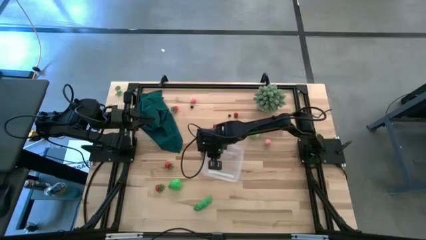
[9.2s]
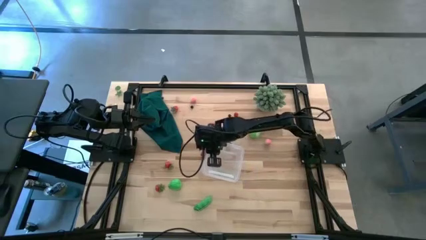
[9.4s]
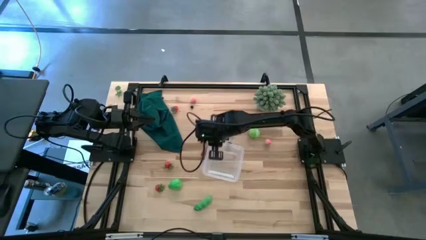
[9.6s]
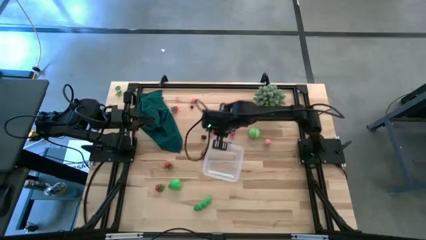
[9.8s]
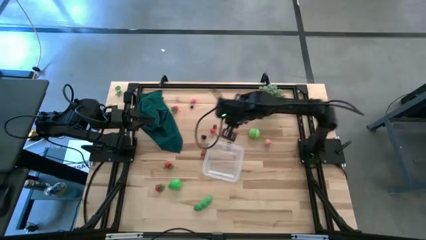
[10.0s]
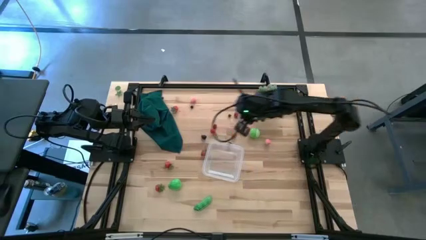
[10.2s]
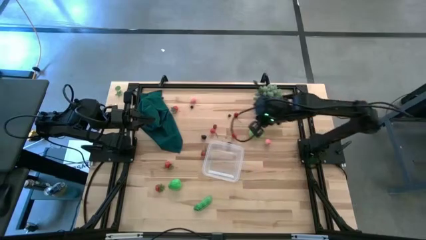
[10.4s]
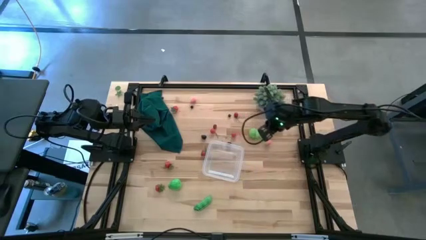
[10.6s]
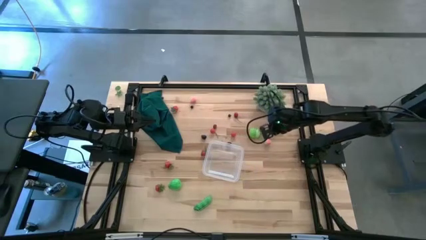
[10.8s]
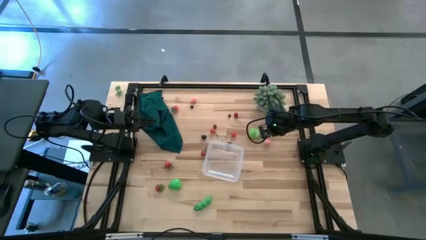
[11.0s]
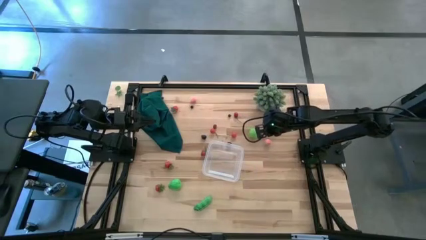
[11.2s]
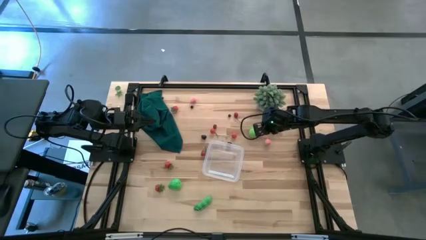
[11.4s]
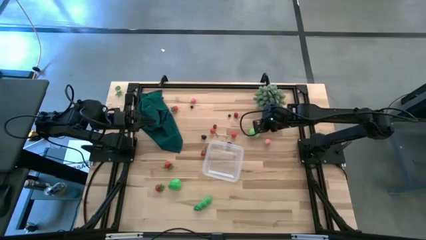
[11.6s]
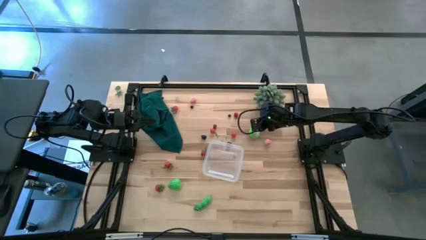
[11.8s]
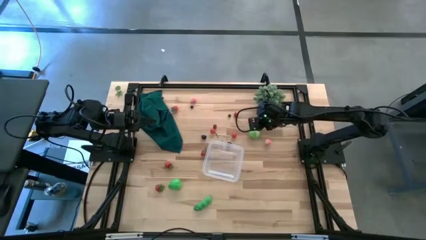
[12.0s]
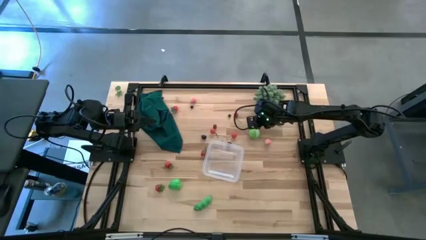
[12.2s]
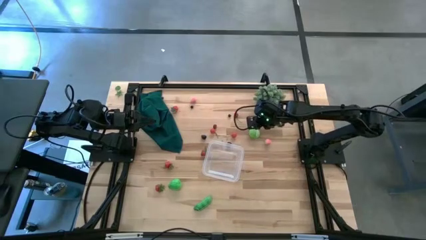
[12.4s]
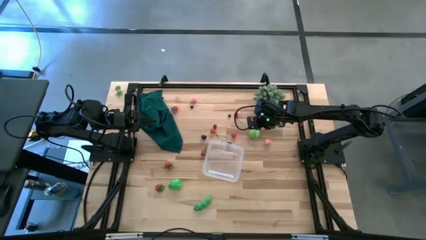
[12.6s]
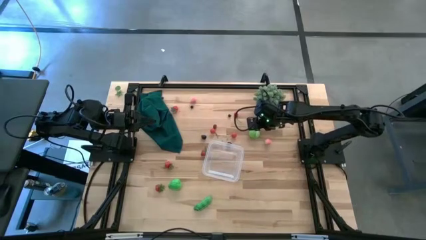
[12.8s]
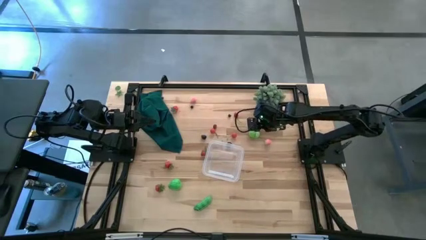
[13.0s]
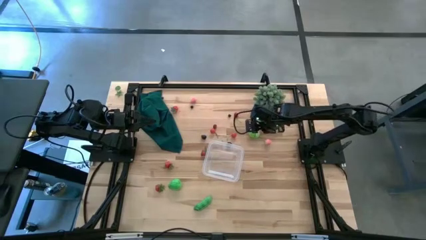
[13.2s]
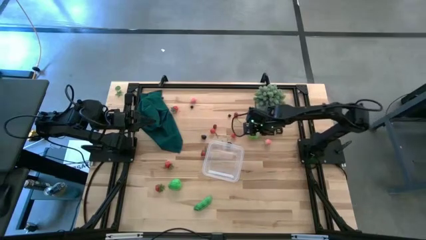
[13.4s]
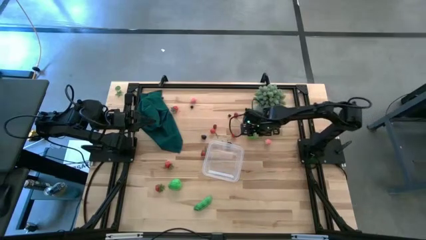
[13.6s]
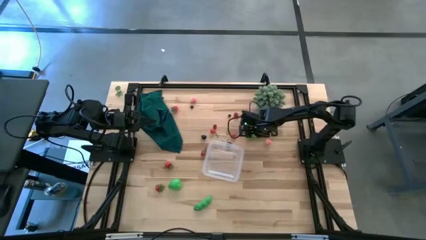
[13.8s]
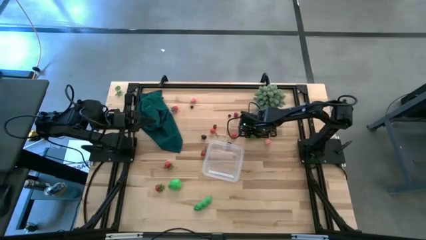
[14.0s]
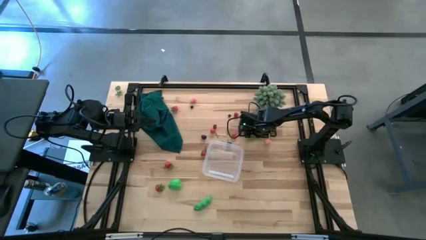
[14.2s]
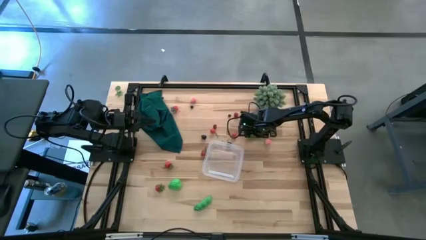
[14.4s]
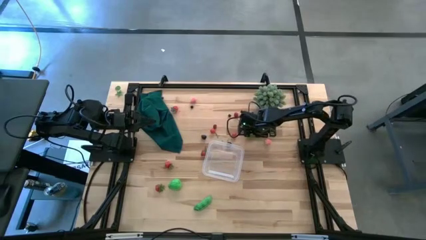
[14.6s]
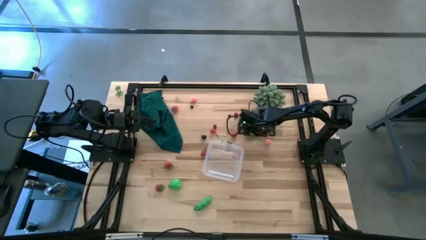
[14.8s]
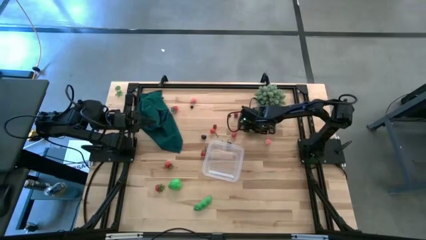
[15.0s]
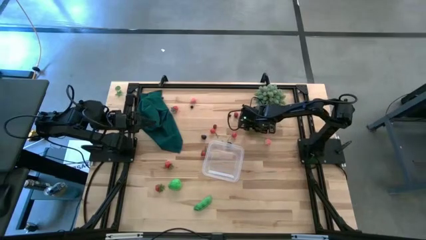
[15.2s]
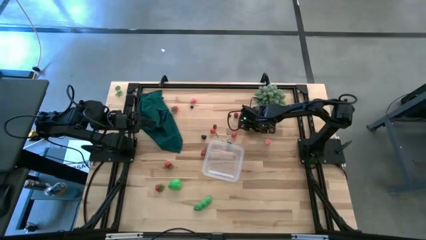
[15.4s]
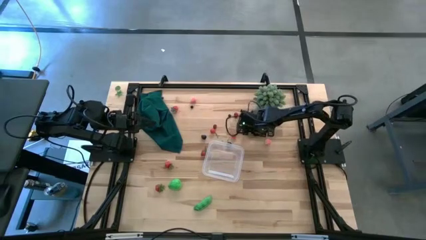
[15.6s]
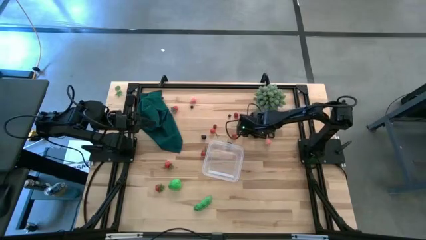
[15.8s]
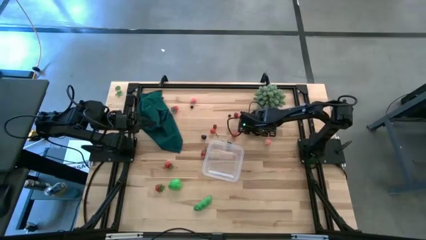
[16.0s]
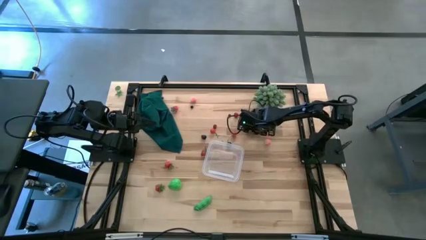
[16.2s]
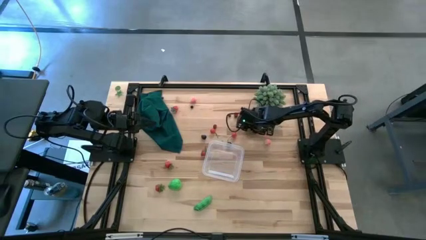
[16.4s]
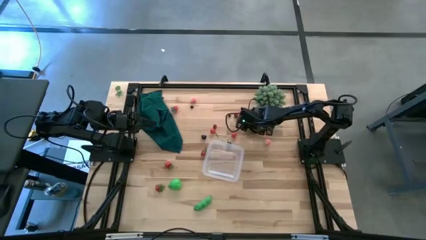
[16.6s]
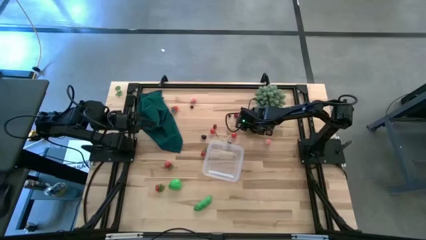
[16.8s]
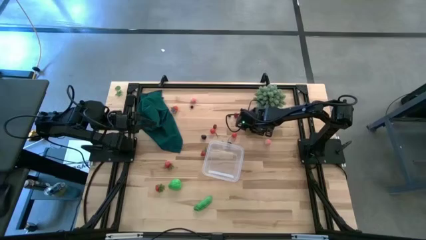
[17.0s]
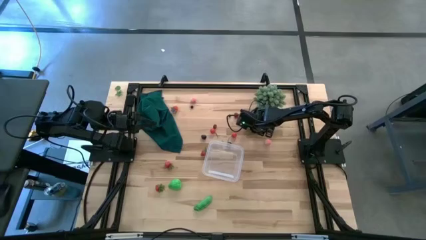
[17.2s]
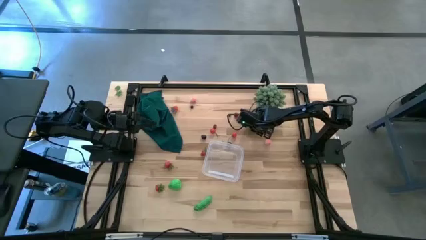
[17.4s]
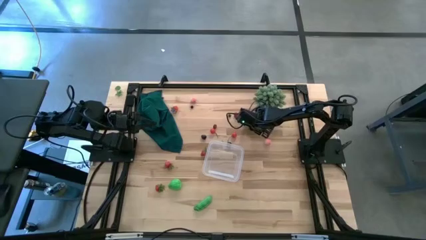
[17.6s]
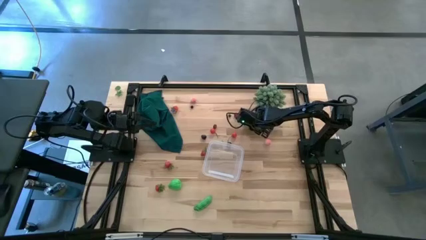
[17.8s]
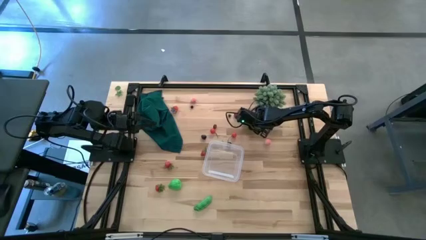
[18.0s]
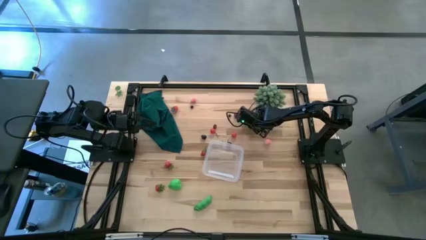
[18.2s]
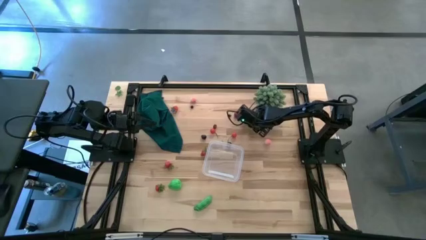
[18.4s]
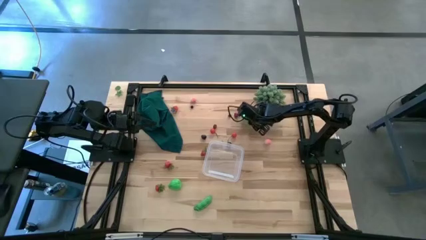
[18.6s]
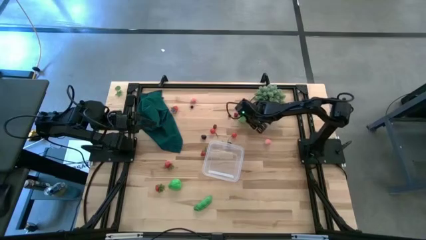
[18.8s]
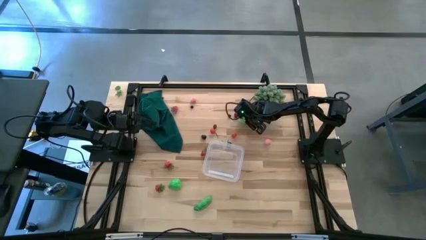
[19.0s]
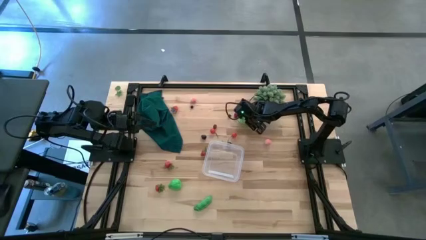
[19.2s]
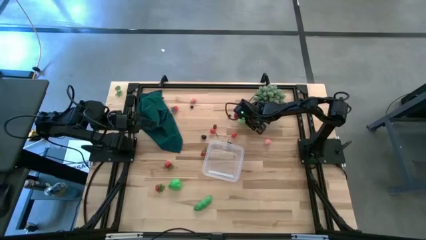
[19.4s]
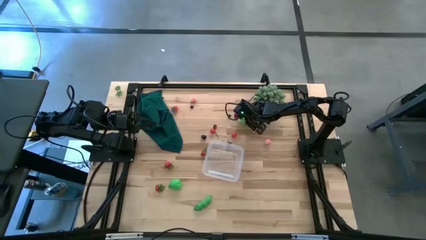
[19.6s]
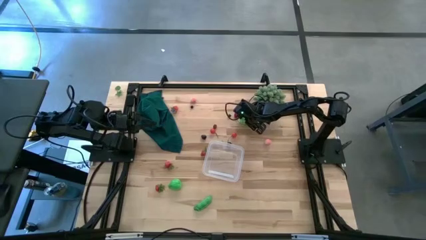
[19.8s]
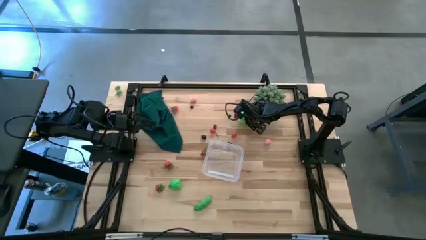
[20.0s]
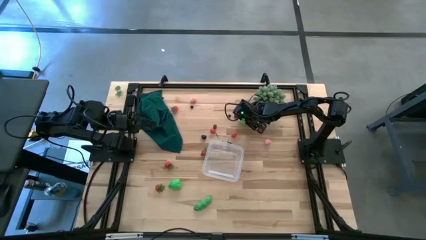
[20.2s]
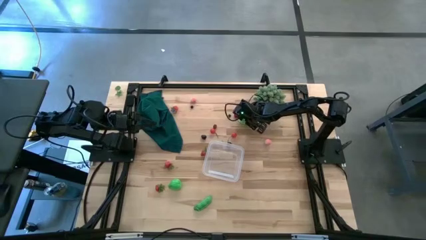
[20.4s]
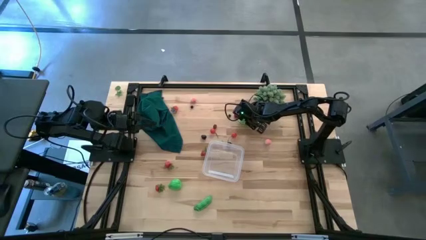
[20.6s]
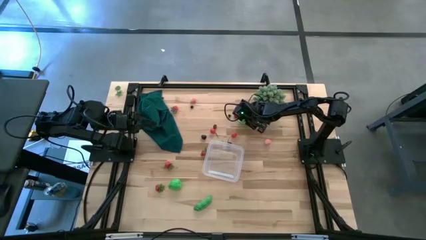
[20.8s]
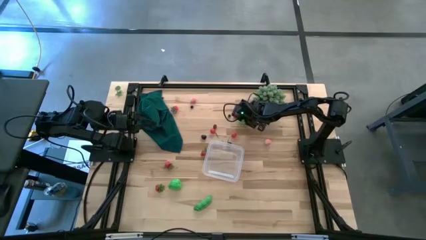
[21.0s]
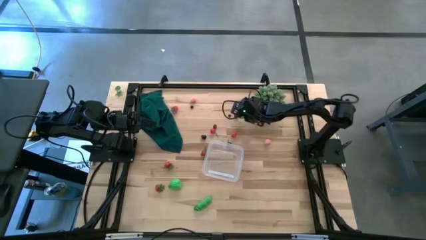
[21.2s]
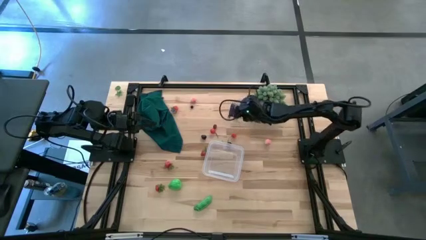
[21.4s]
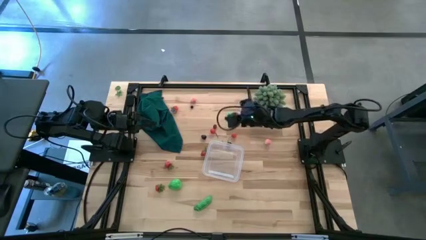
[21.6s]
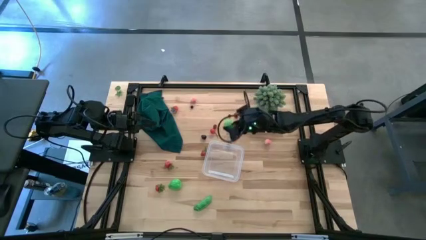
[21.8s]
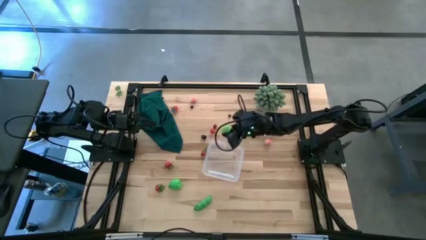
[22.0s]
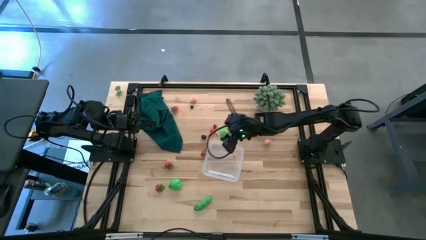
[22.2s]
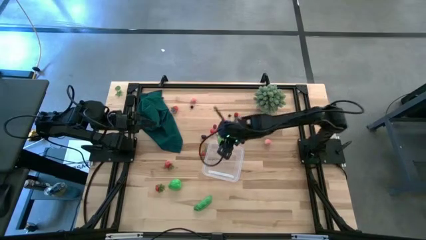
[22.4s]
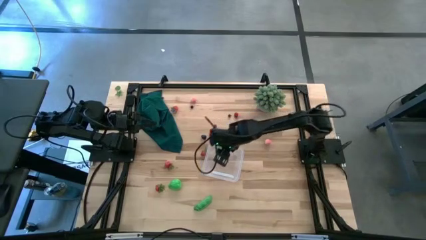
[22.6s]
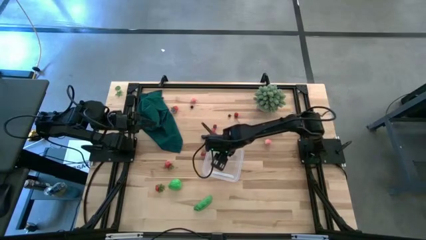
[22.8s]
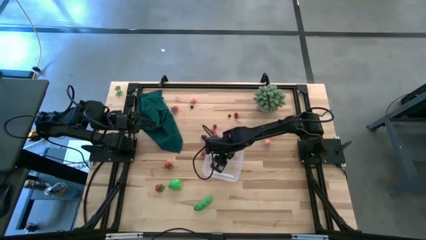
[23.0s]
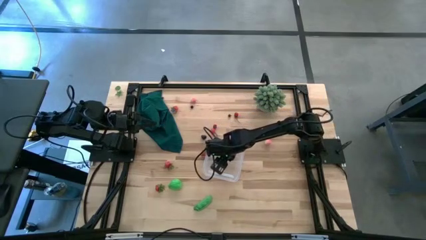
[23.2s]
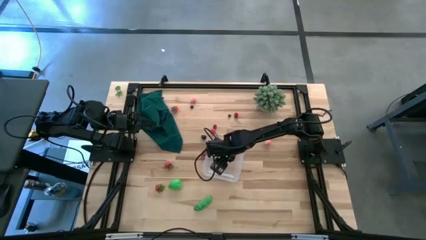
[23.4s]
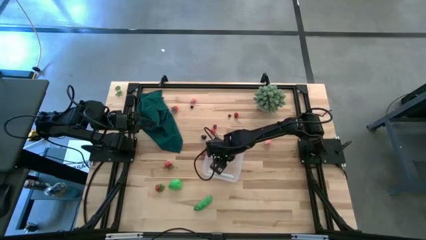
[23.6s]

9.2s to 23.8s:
Task: Pick and placing Produce into tupperware
Put the green cabbage into the container
